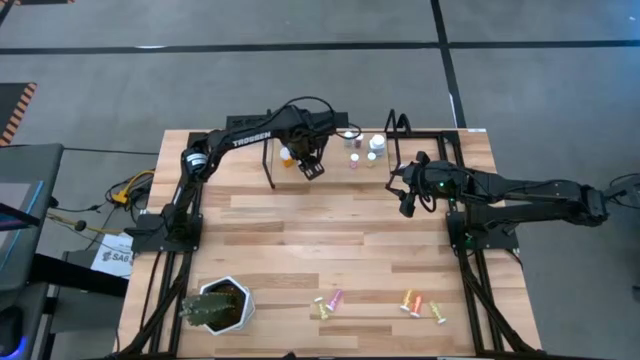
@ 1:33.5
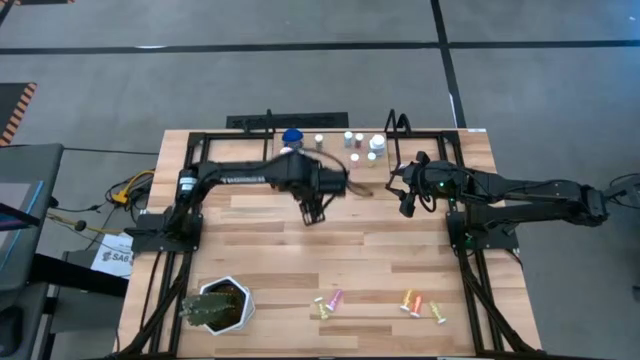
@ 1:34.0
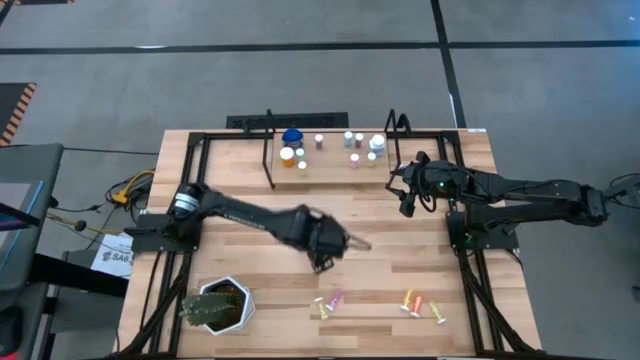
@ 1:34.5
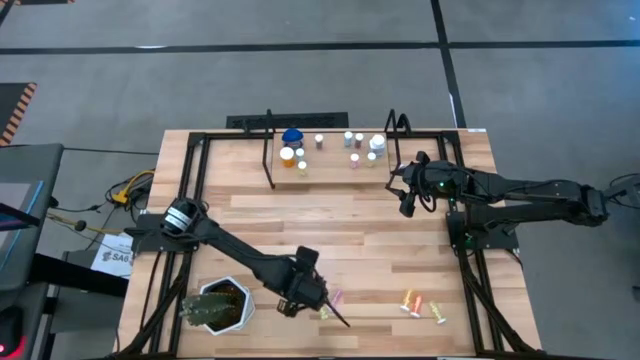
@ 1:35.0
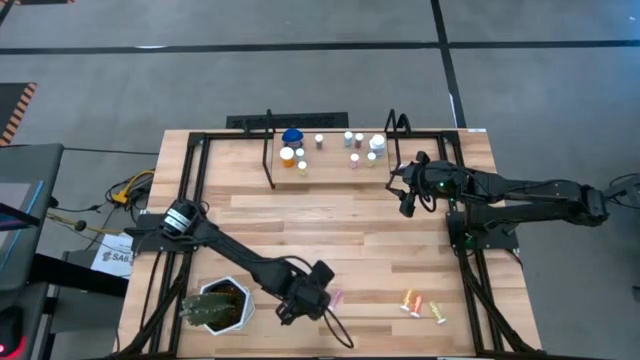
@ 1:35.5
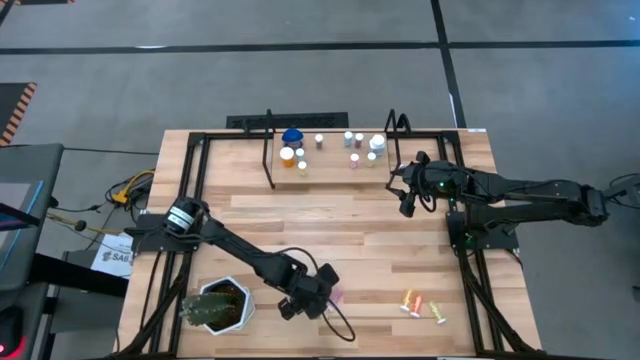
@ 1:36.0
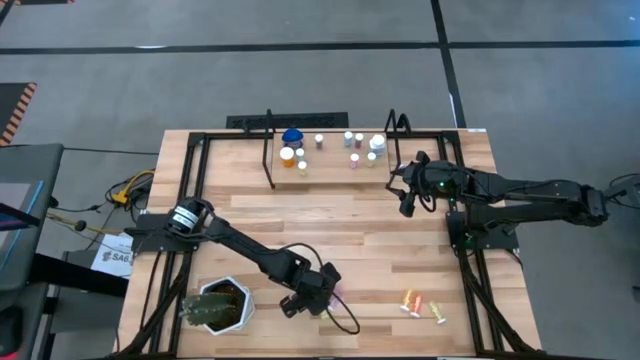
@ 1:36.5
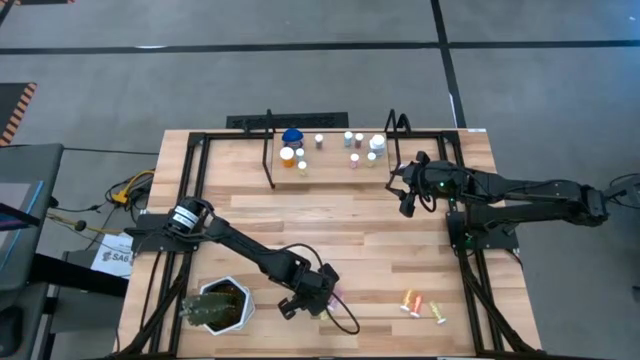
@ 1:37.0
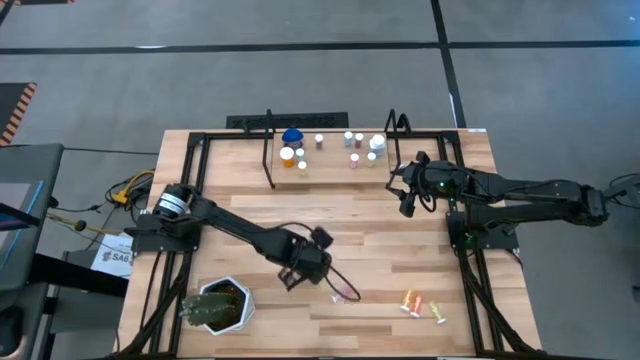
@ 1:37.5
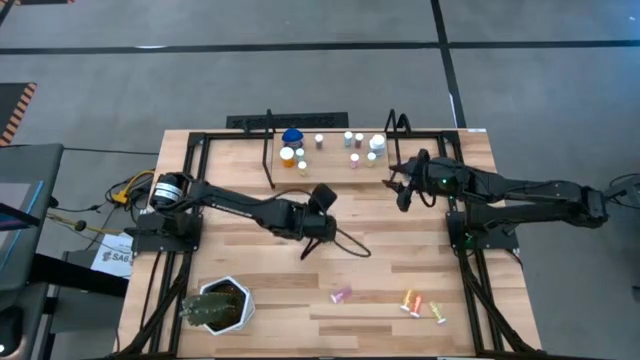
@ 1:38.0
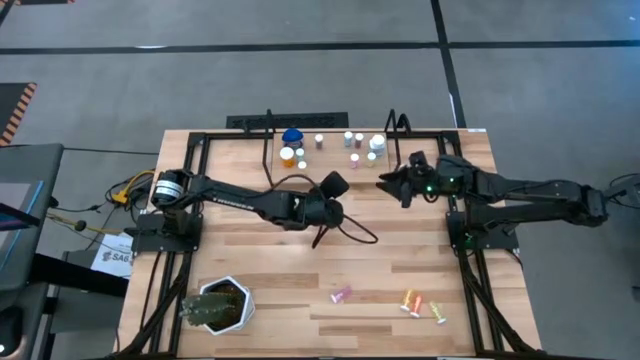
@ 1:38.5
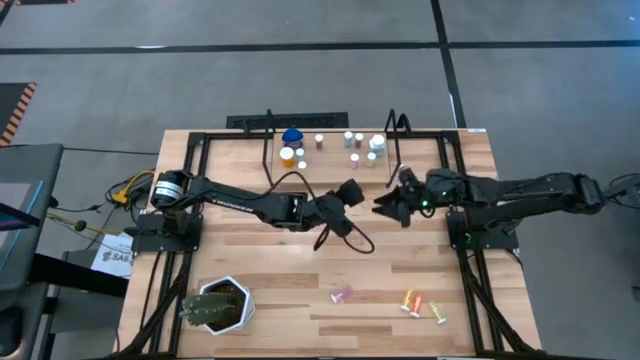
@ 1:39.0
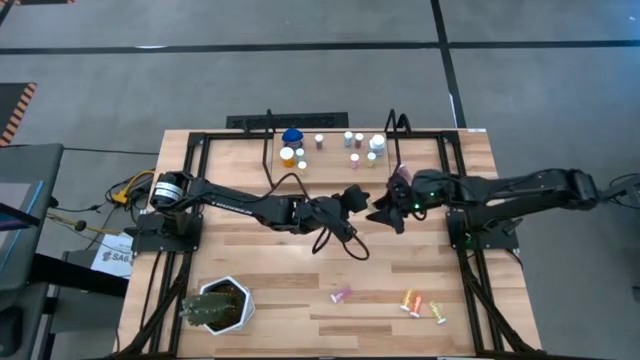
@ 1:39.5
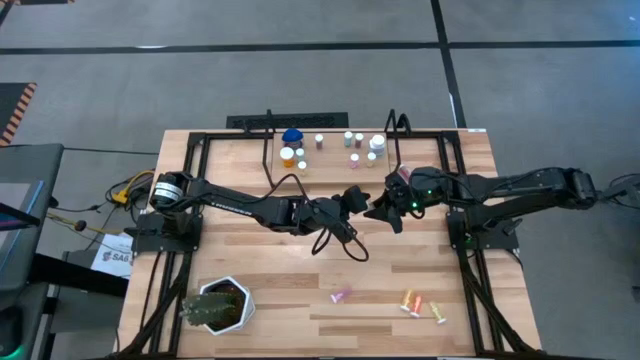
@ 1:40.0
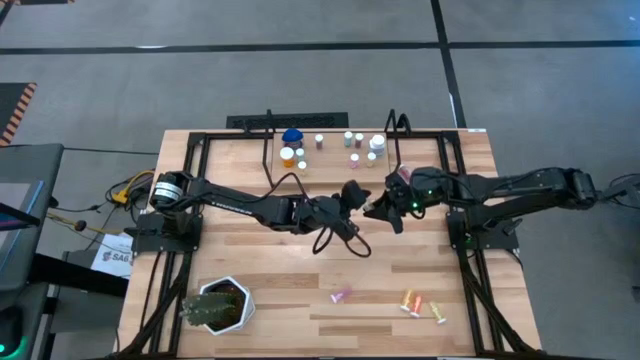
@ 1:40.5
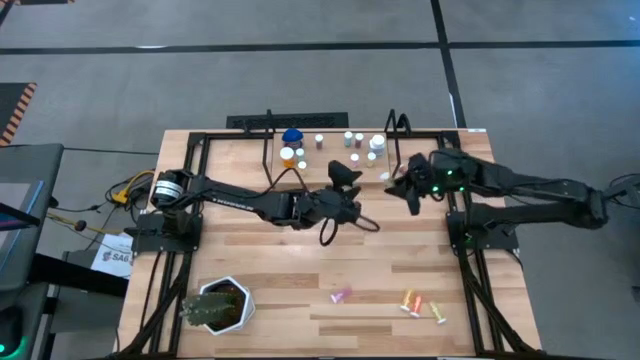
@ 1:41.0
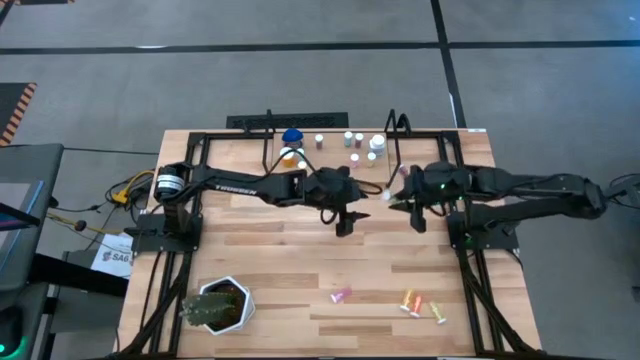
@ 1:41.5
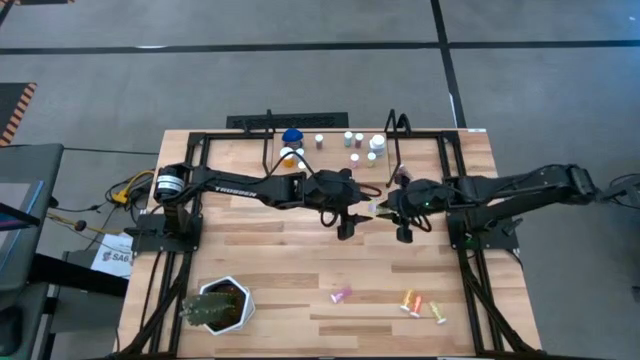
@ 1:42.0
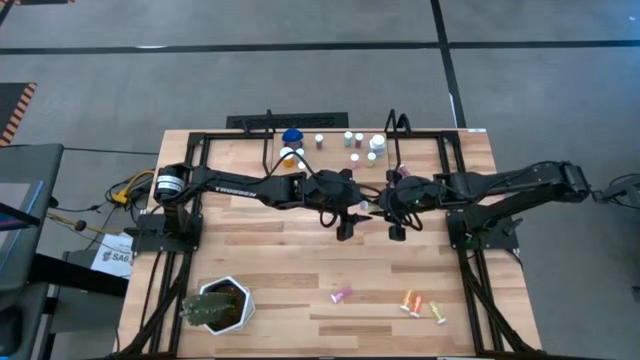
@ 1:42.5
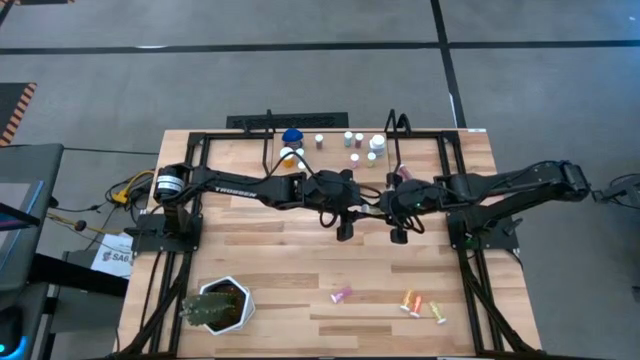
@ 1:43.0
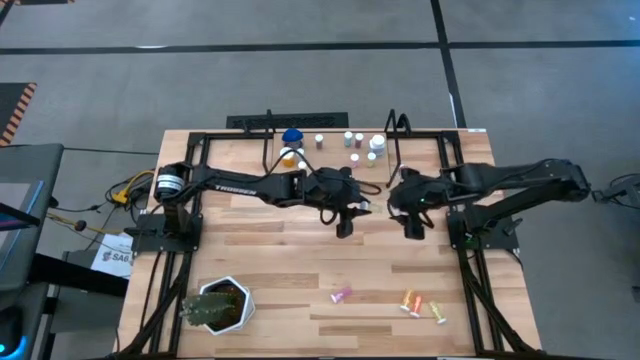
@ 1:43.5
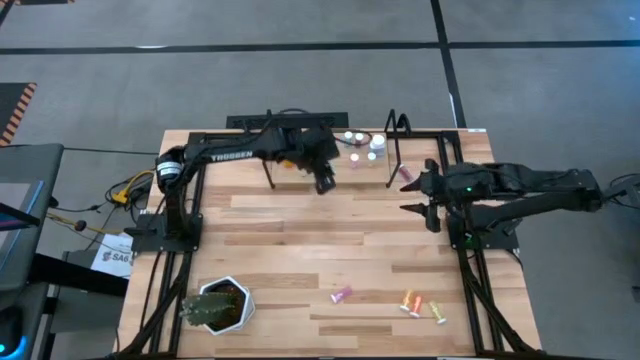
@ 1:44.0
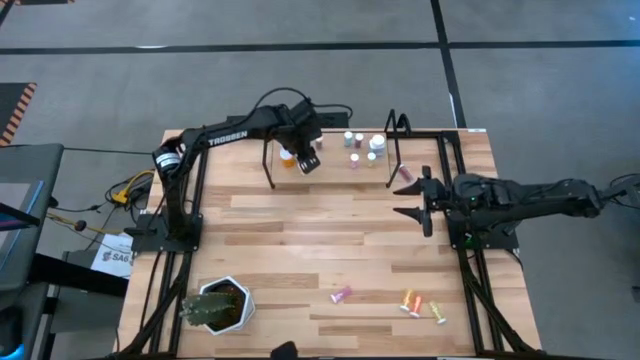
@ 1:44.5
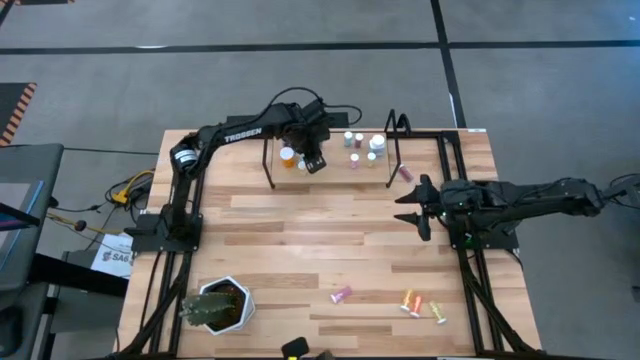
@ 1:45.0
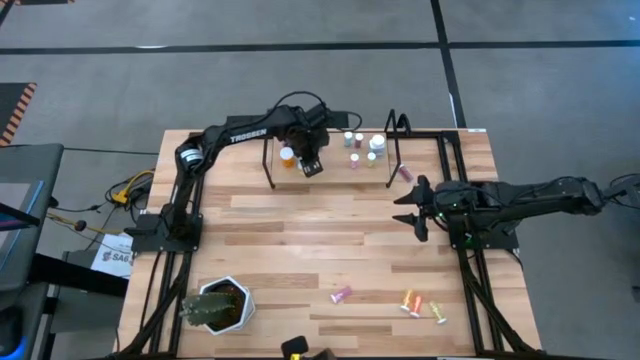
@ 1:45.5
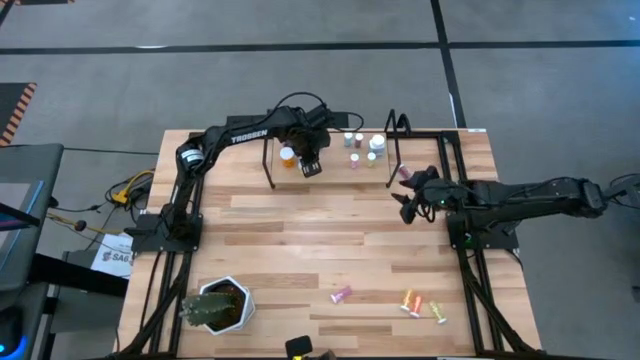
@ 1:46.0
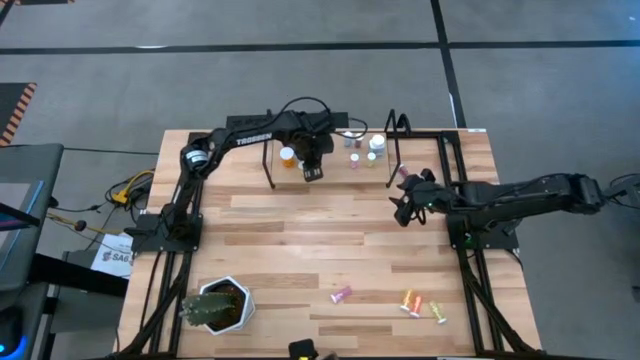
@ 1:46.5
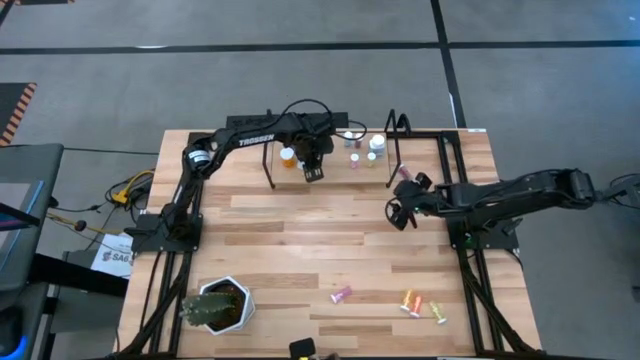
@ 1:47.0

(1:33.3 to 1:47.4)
Task: Pick and place medicine bottles onto shelf by color
Put the yellow pill bottle on the shelf

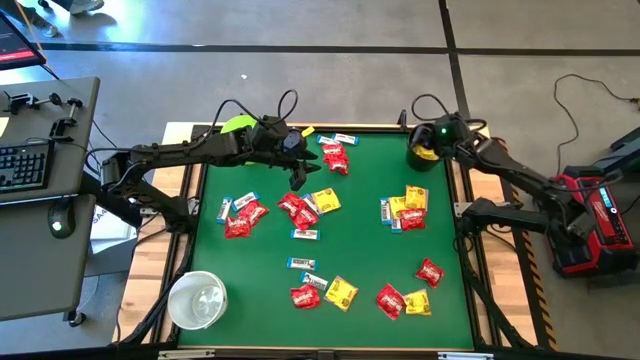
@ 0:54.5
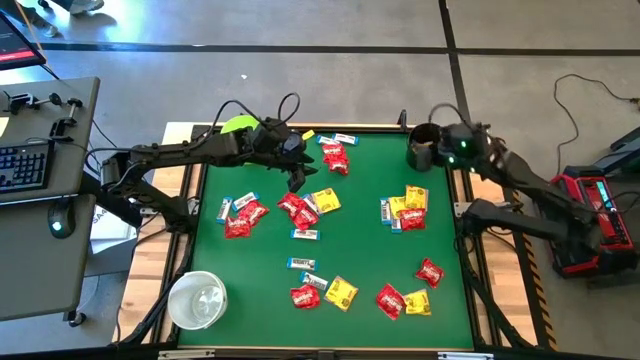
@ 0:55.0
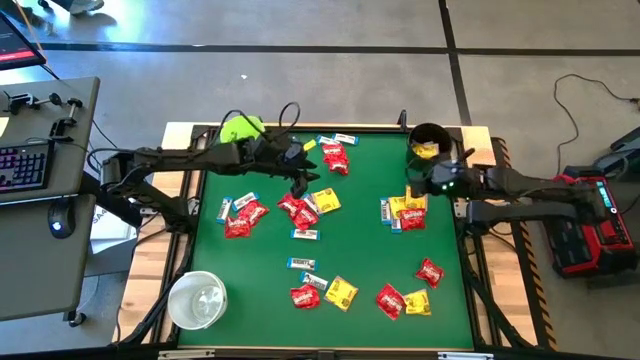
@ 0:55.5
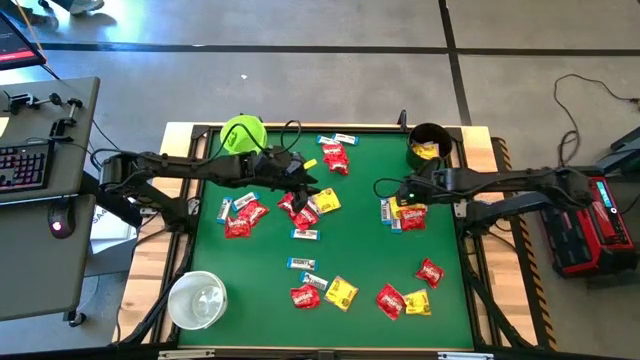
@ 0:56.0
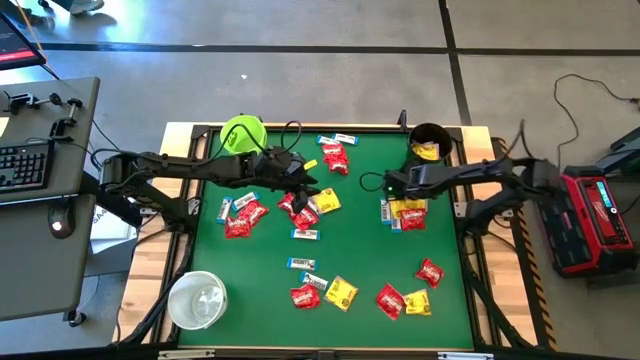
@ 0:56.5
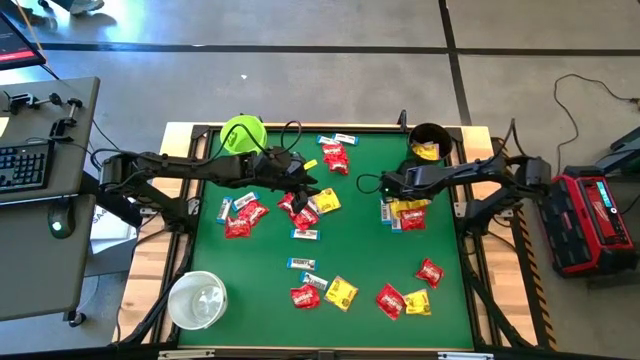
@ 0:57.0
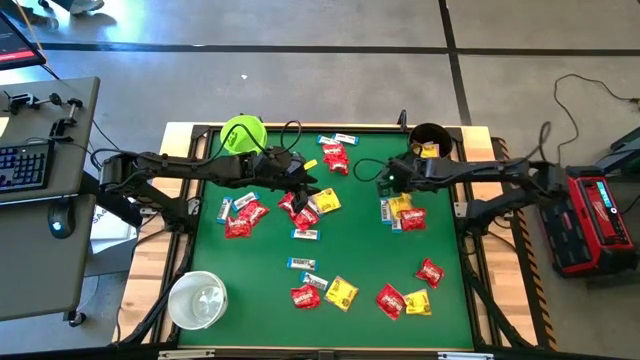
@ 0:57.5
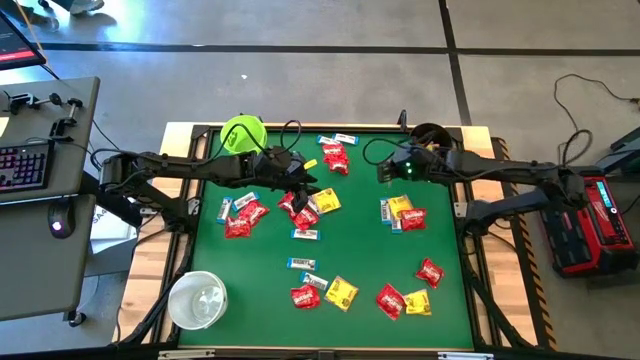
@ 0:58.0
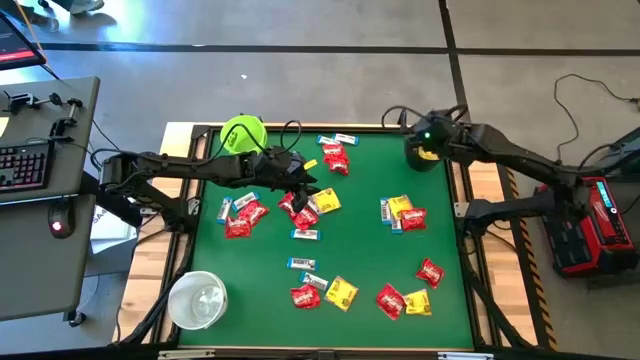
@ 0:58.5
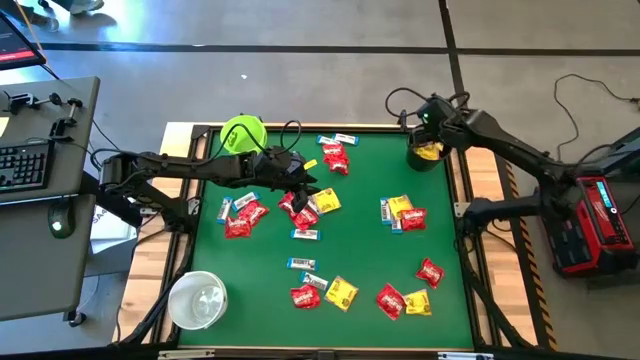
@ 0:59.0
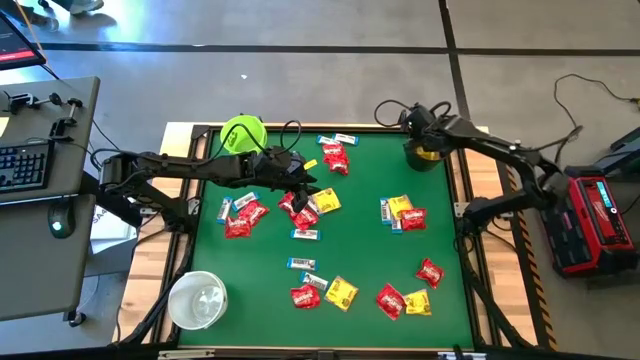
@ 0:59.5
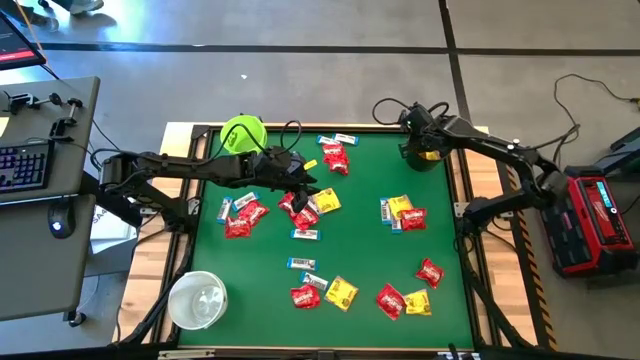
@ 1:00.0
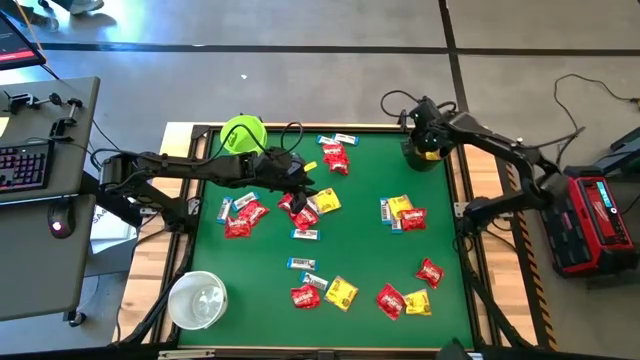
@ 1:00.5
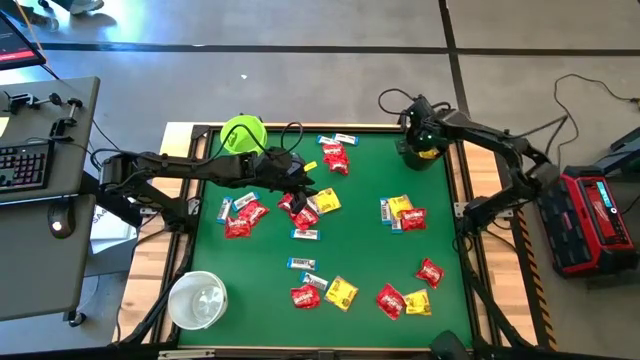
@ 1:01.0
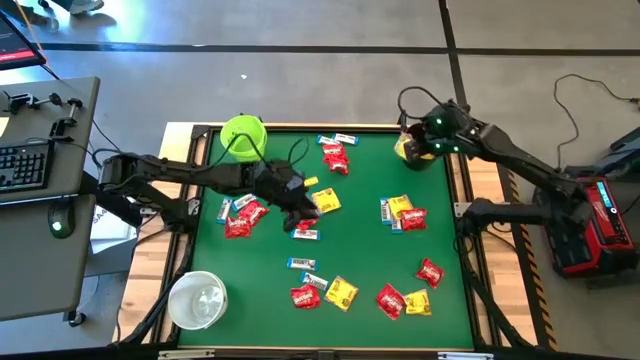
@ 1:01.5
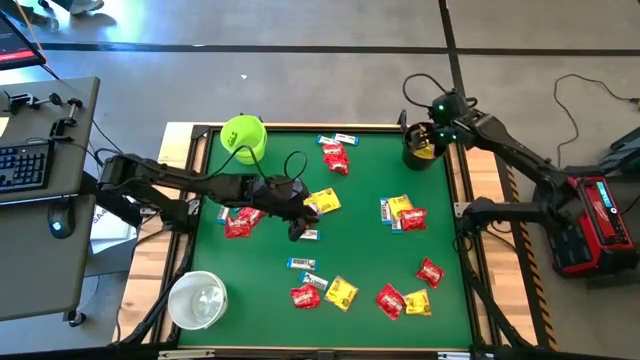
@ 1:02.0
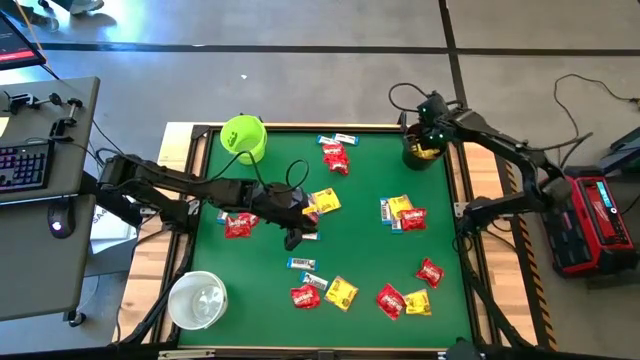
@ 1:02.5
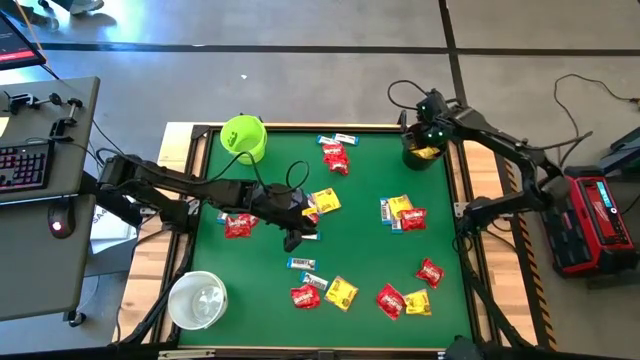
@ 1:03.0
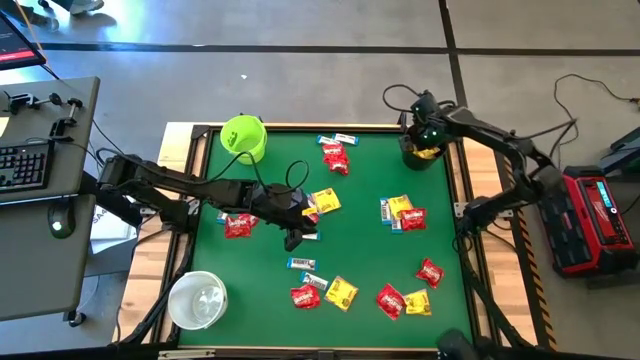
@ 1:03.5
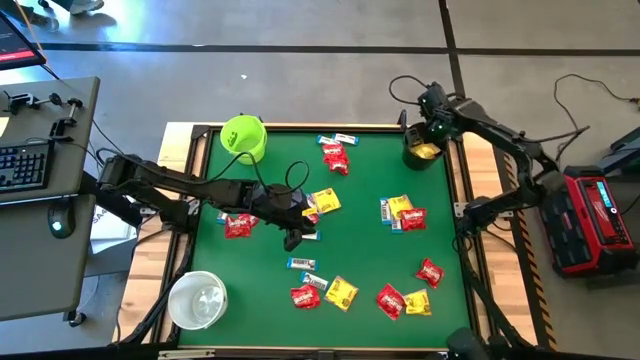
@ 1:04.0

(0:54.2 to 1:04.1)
Task: Sort candy by brand, put in halloween buckets
Put the yellow candy into the black bucket
